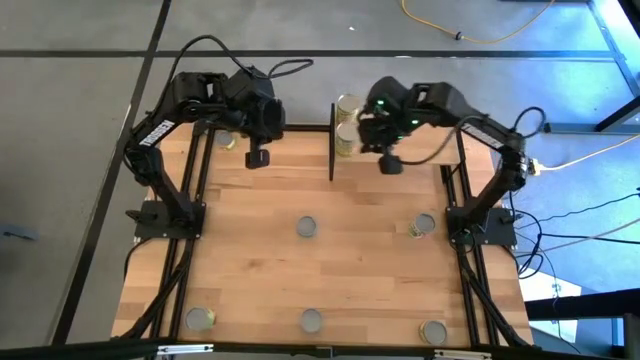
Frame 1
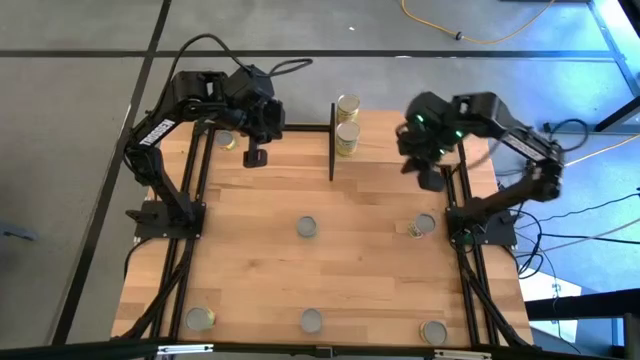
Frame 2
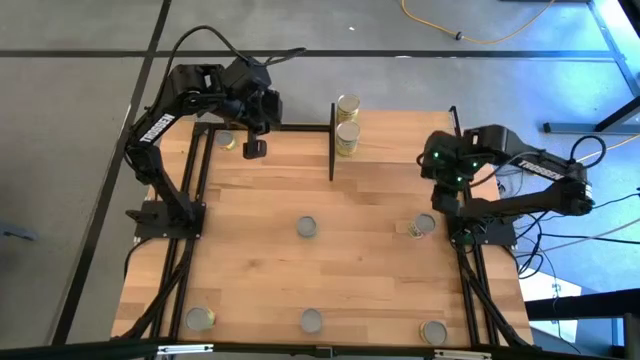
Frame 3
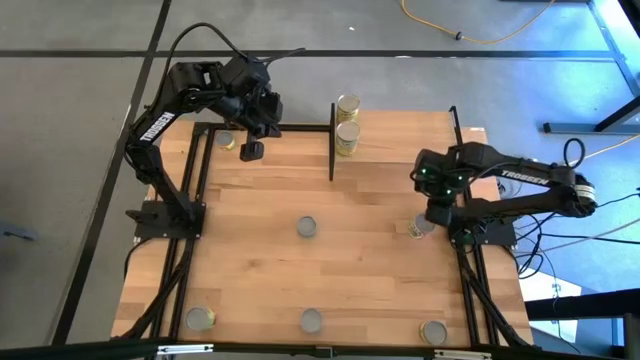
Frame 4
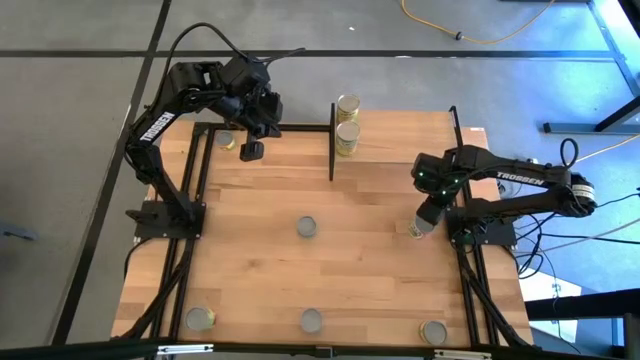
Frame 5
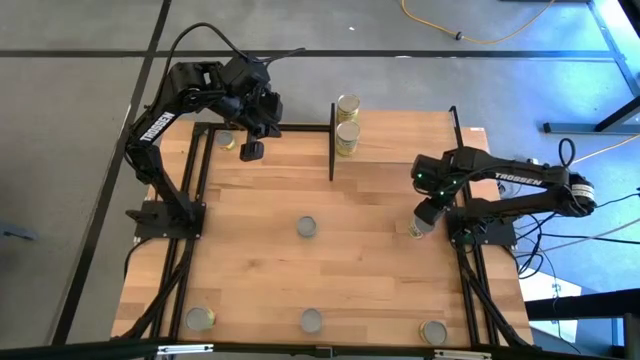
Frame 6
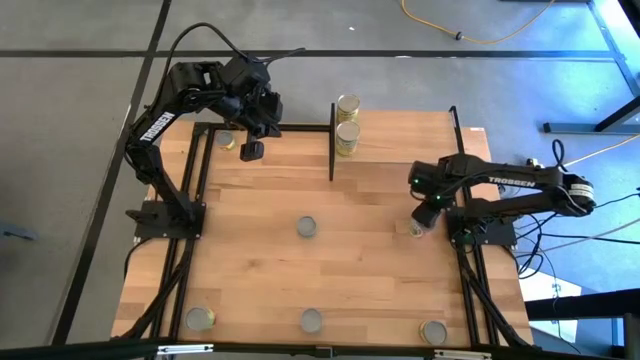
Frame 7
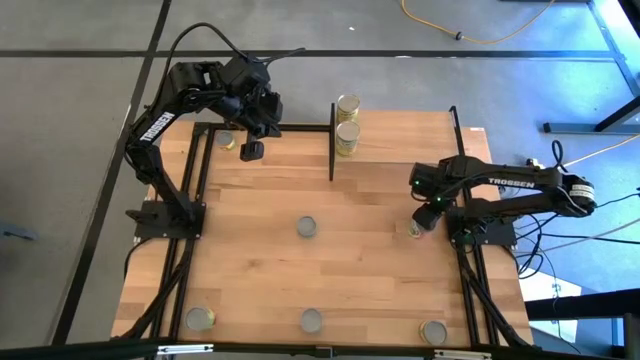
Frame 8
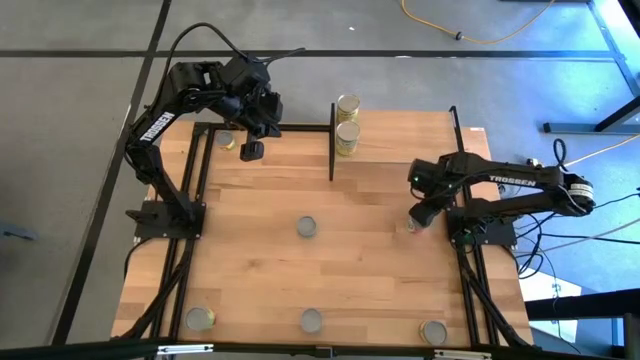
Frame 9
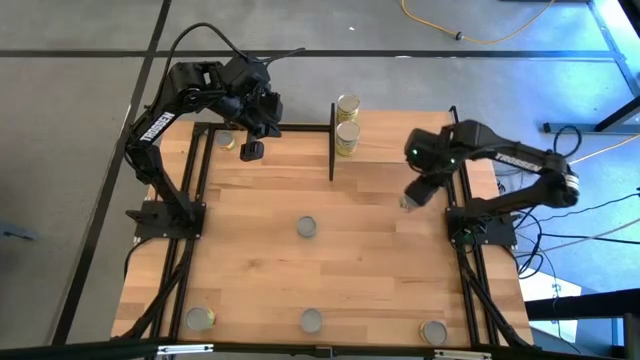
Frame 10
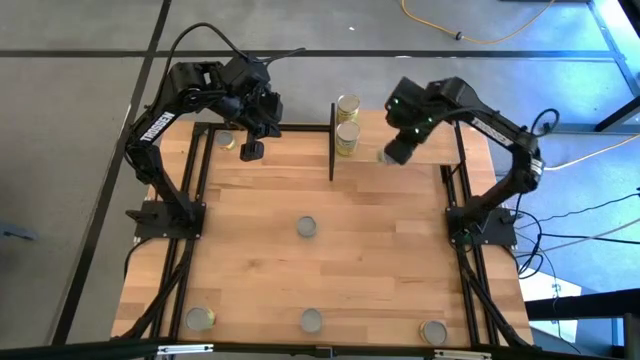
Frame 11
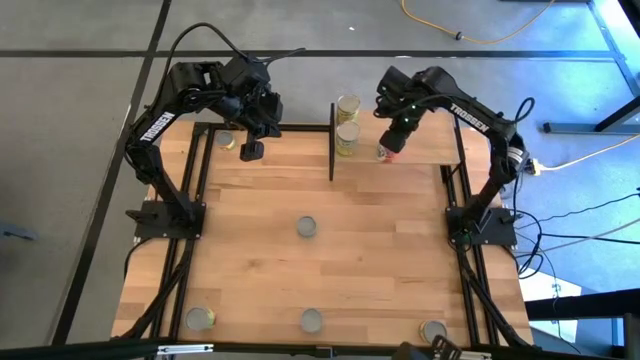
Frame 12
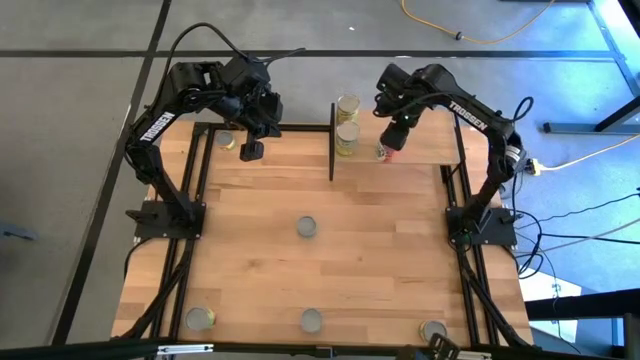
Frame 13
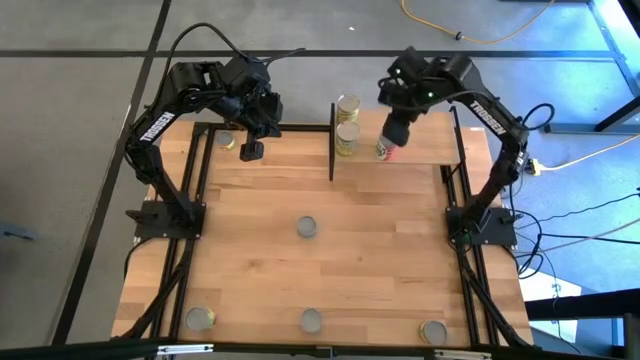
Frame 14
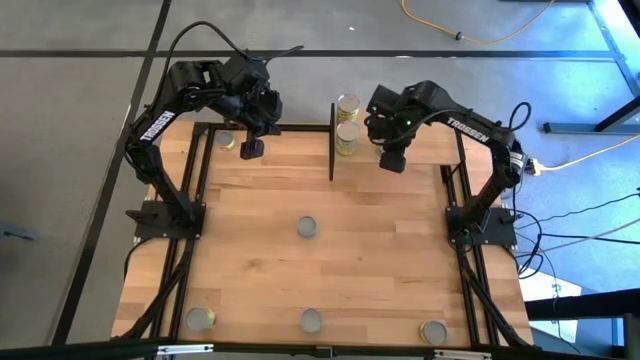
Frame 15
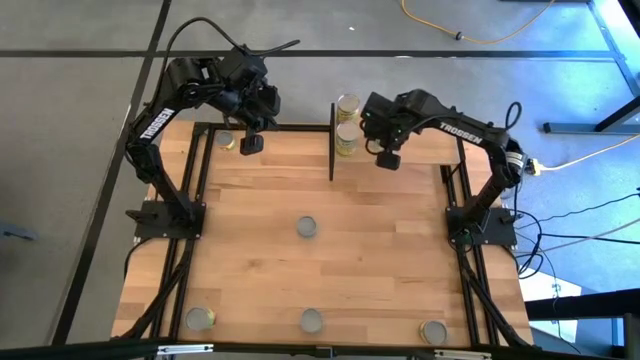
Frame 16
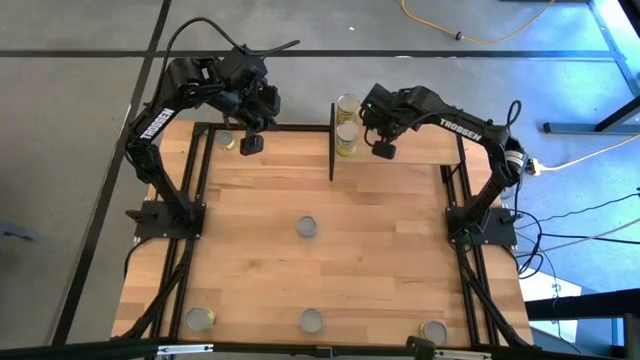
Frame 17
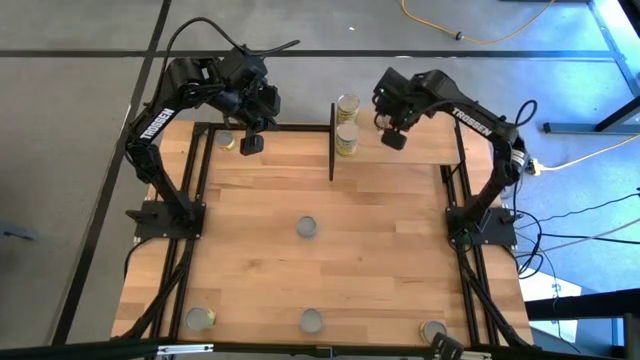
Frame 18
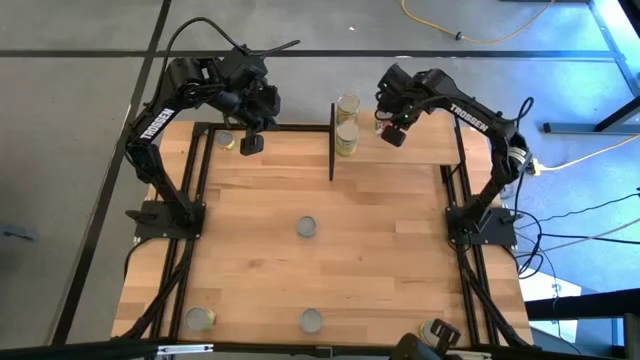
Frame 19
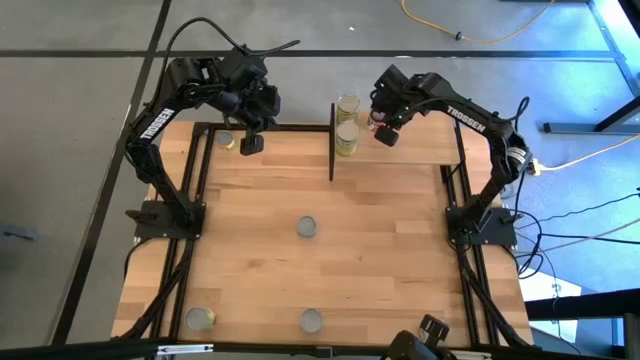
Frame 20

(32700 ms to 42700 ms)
Task: Pick and place cans onto a shelf
Put the orange can on the shelf

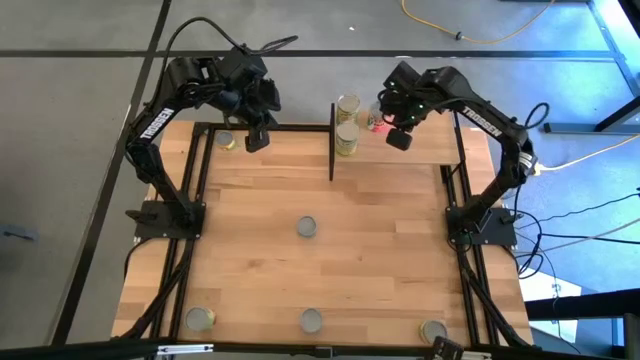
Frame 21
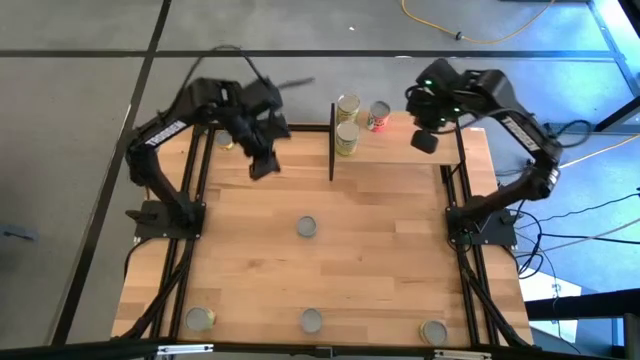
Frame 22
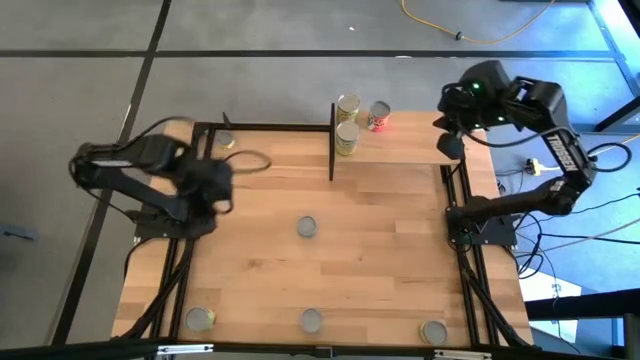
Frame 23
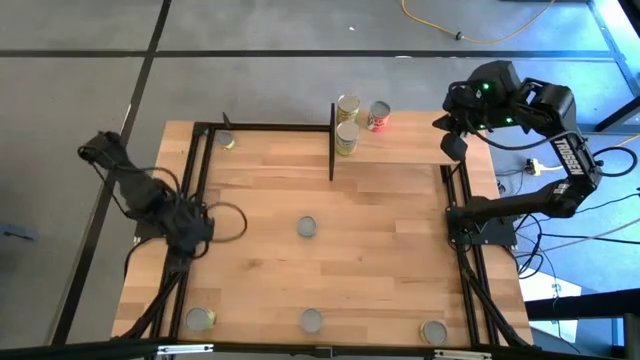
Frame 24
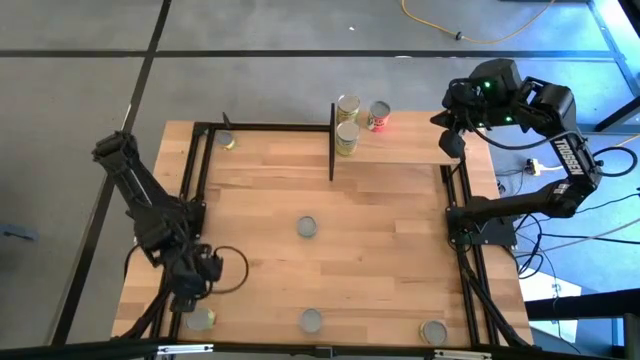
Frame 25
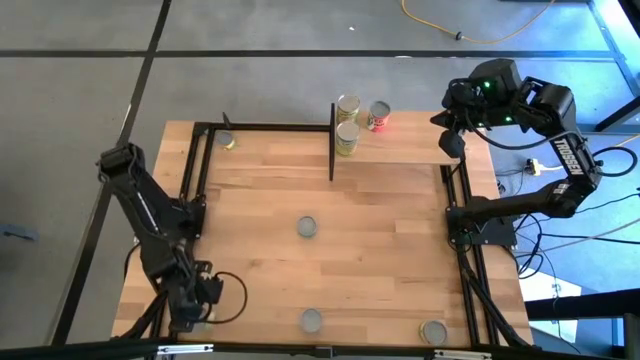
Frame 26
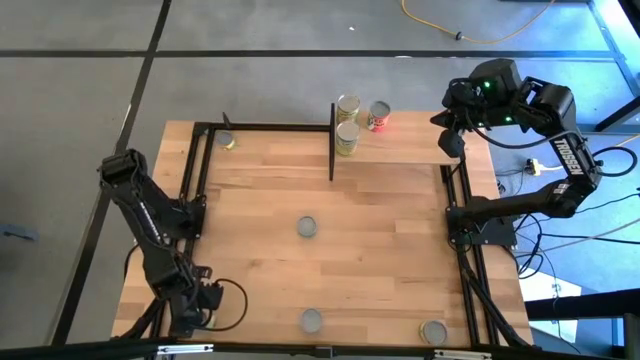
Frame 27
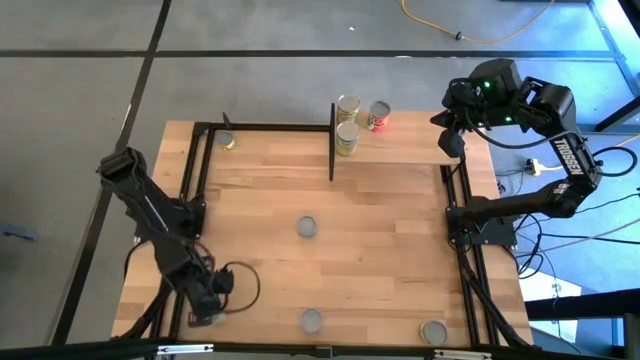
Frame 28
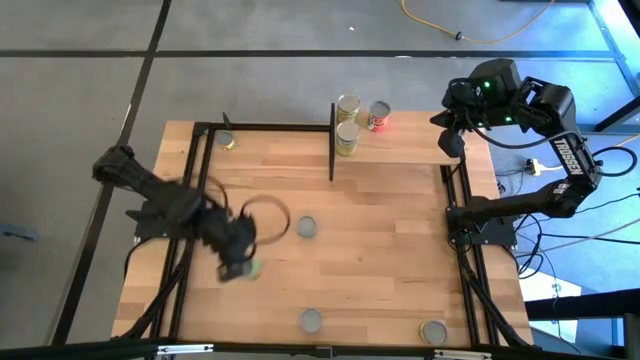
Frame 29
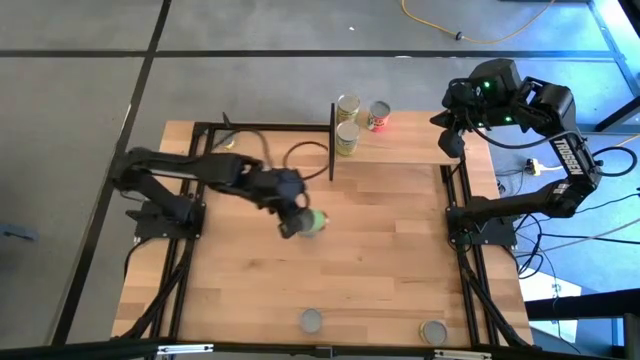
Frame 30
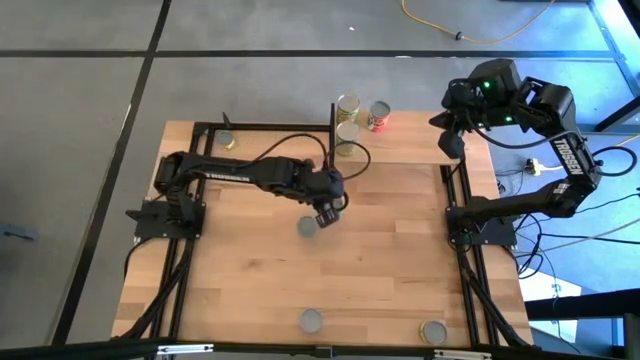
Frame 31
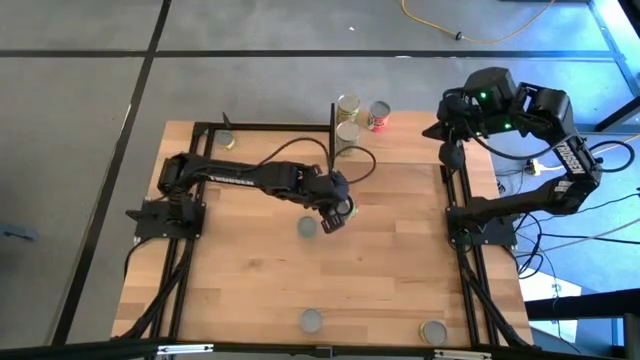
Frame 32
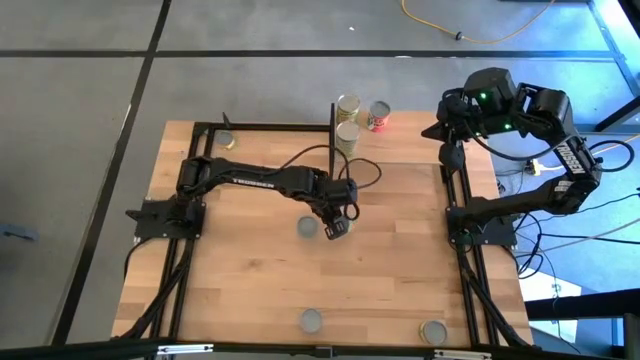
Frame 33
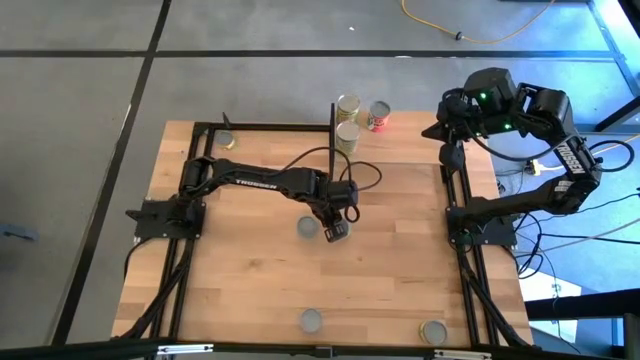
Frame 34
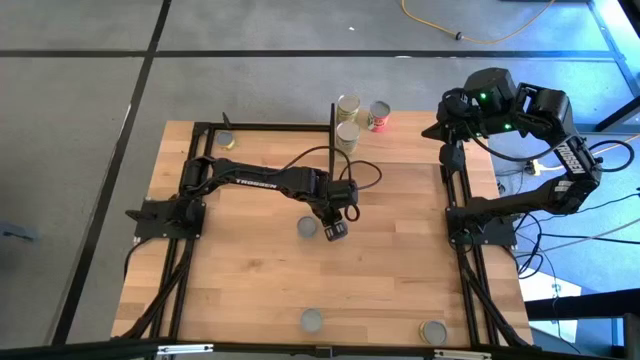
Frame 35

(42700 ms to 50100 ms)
Move the green and red can to the middle of the table

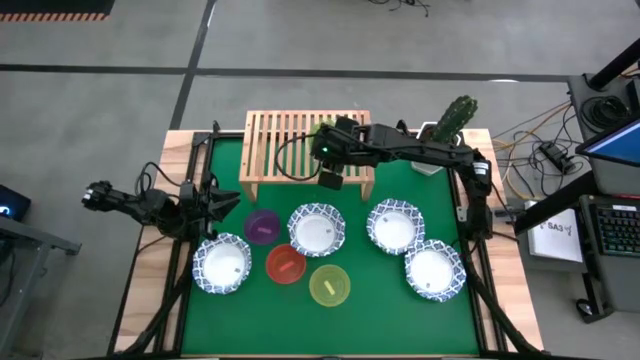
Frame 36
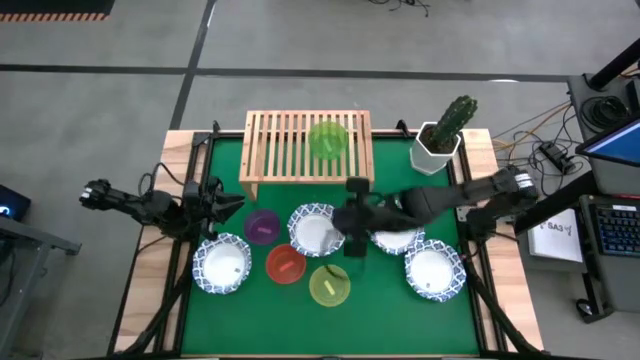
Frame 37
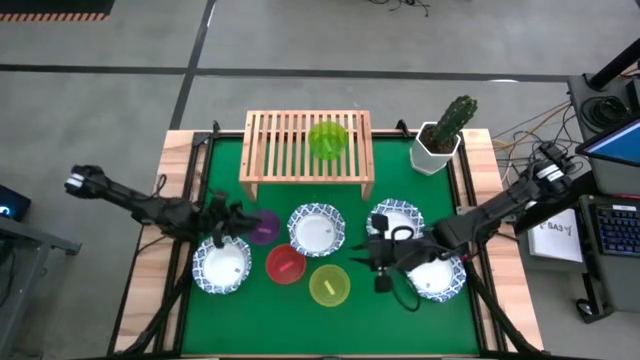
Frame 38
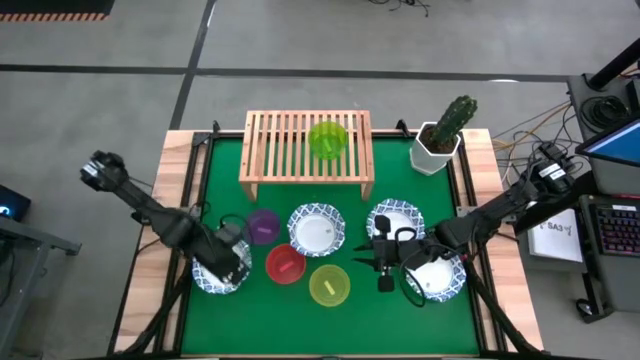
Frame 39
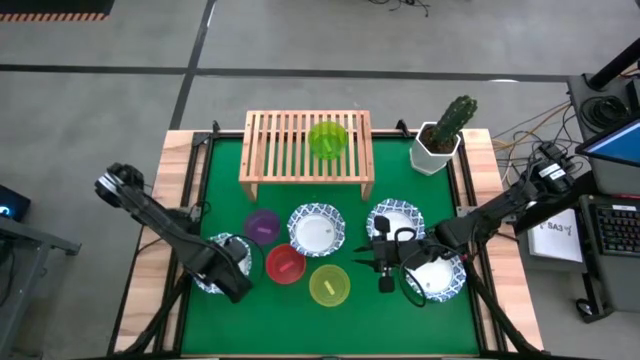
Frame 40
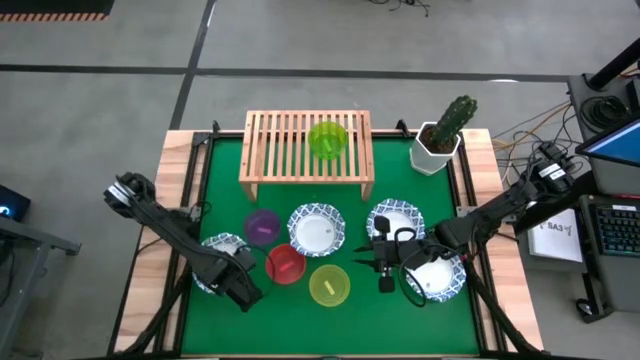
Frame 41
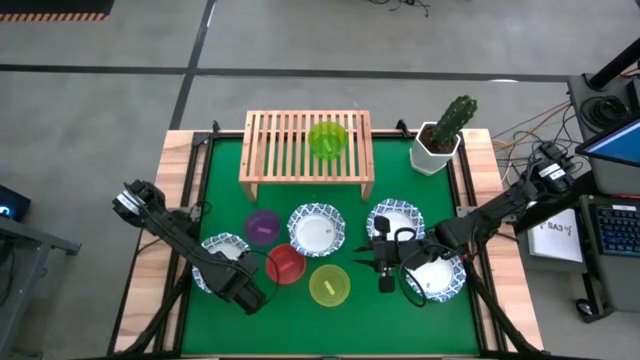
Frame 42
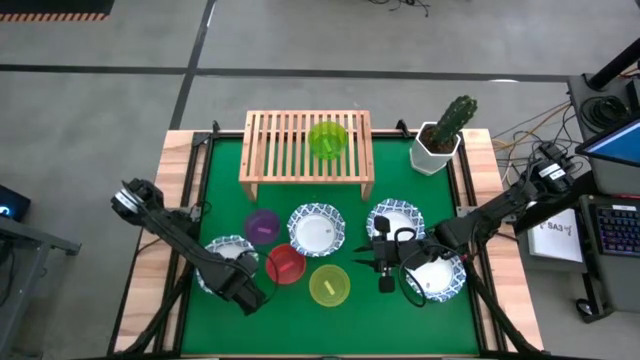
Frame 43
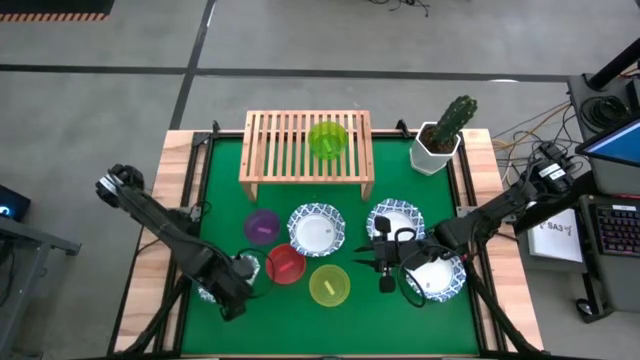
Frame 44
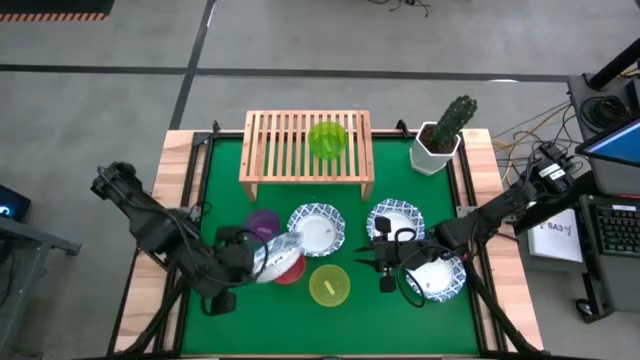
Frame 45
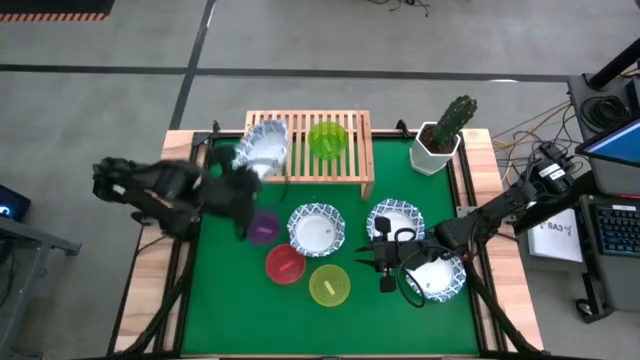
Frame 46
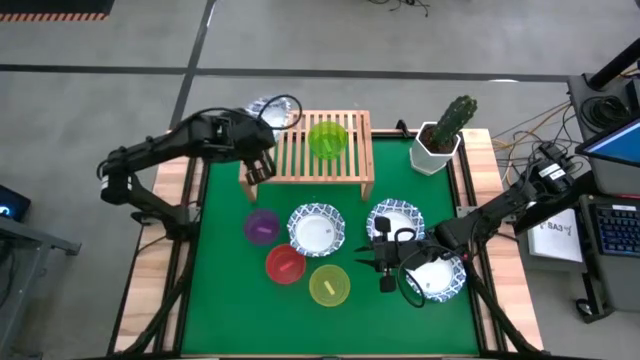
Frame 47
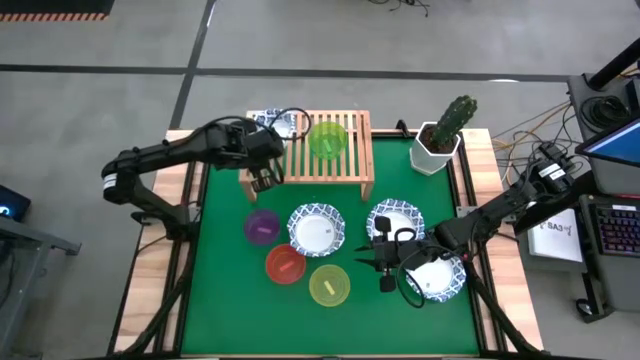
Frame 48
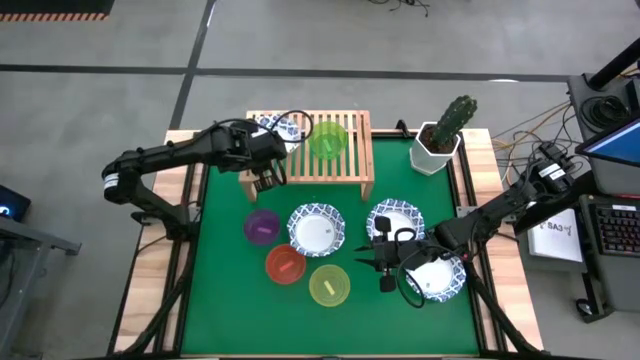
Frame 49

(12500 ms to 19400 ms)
Task: Place and stack bowls onto a shelf
Put the large blue patterned bowl on the shelf
